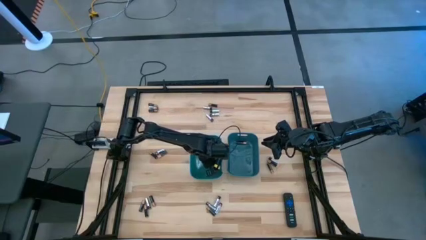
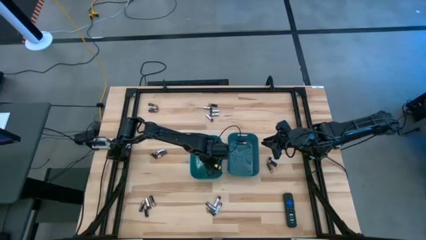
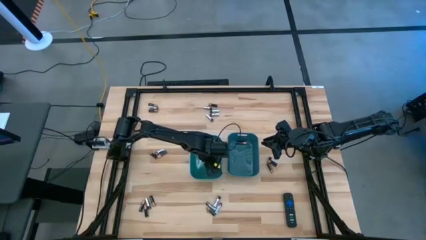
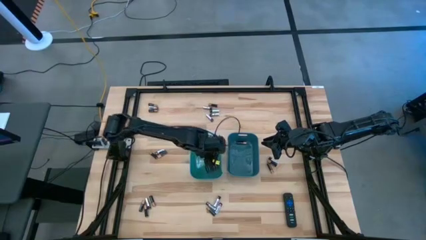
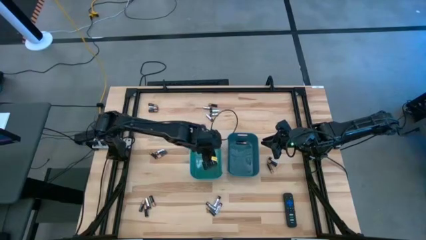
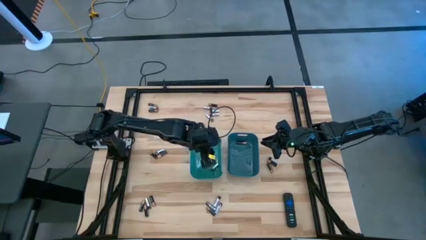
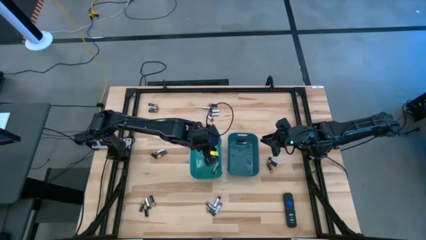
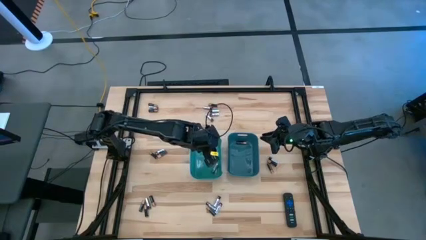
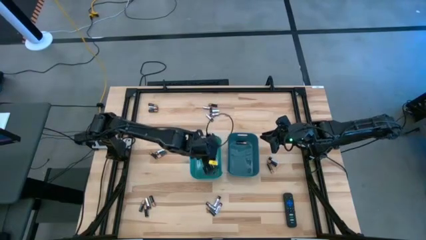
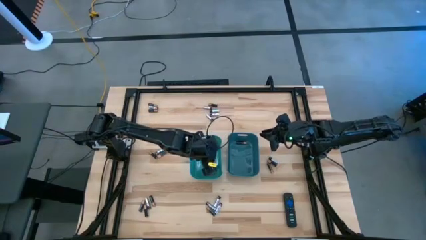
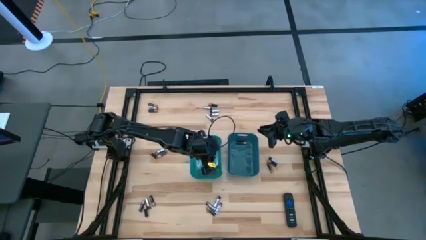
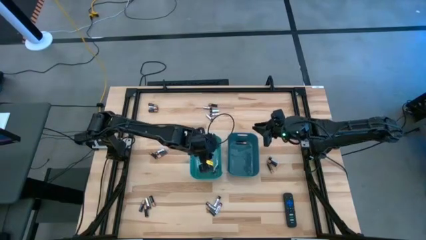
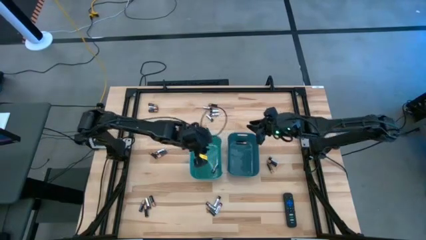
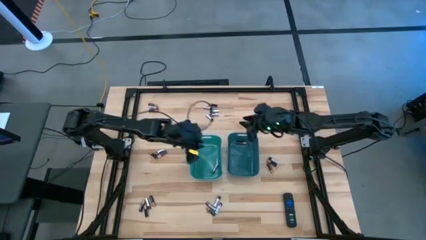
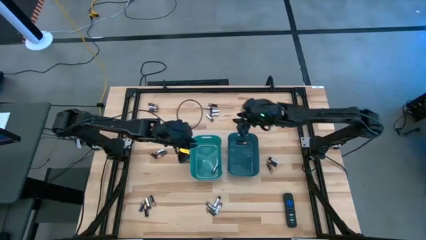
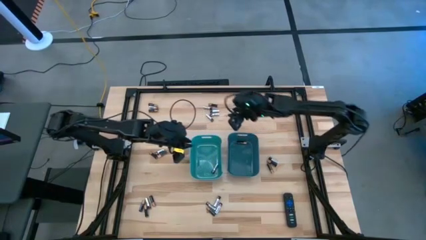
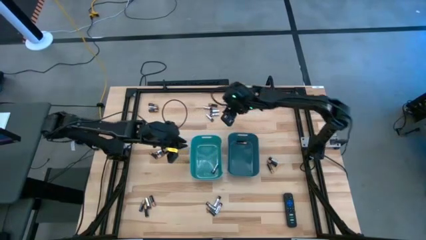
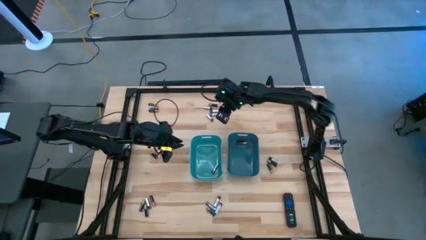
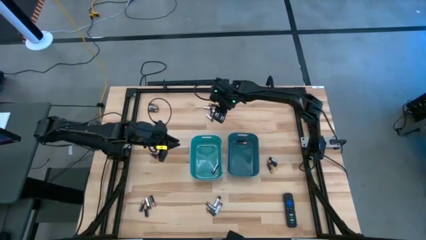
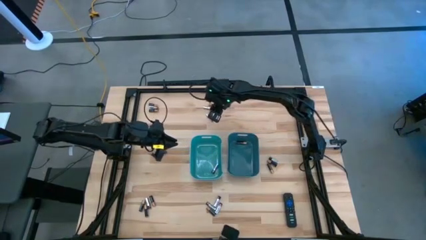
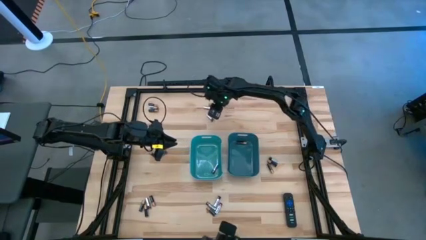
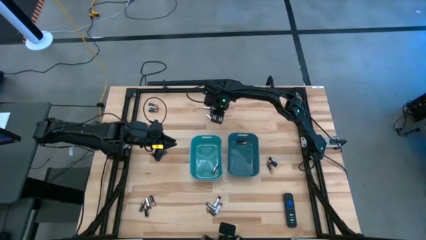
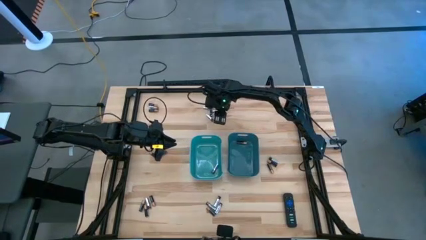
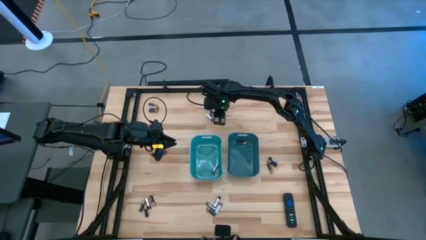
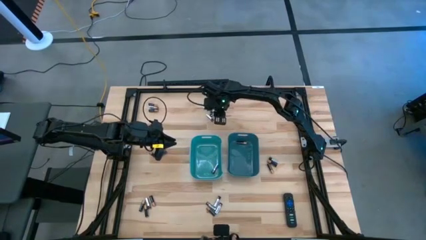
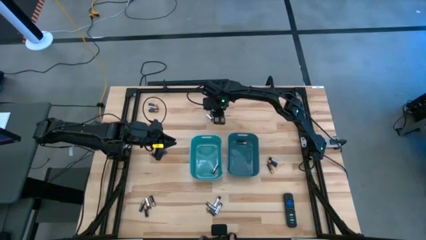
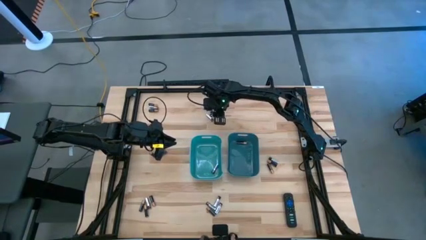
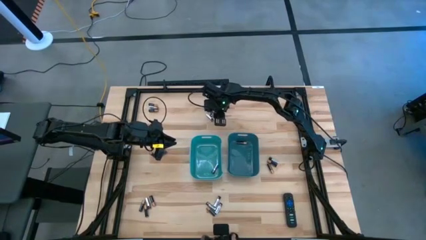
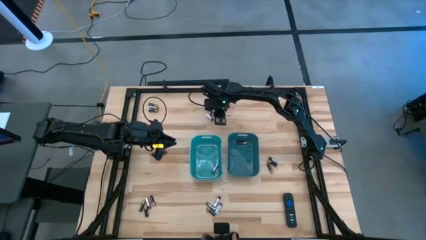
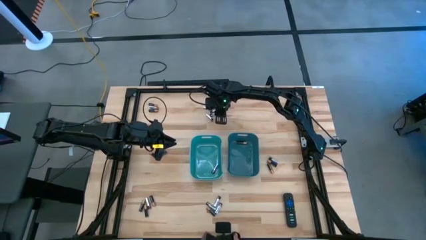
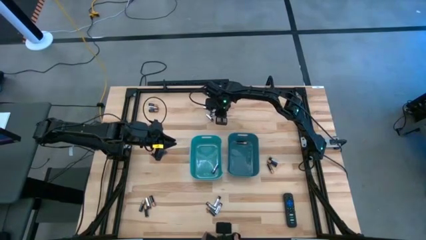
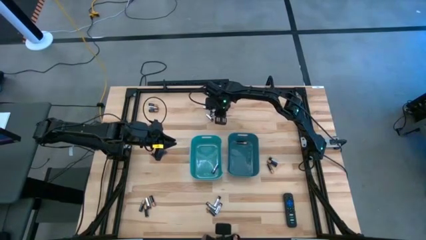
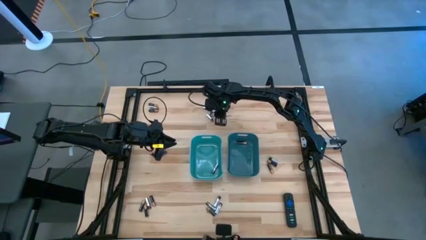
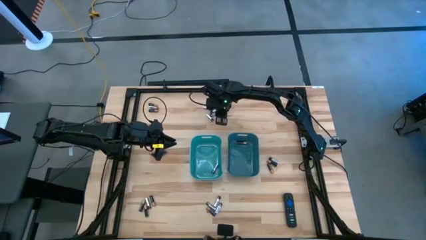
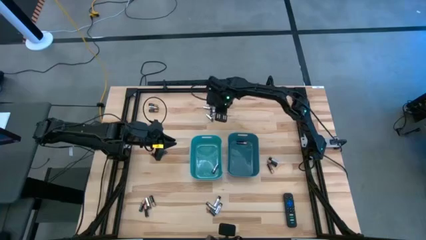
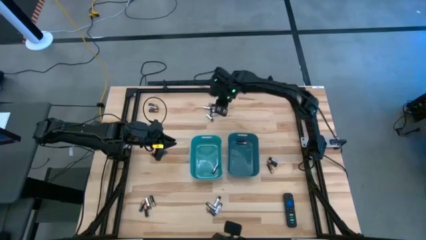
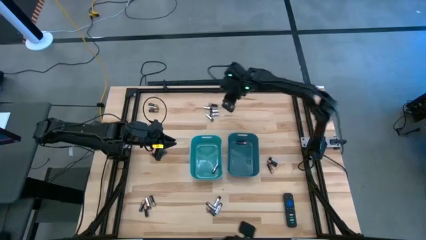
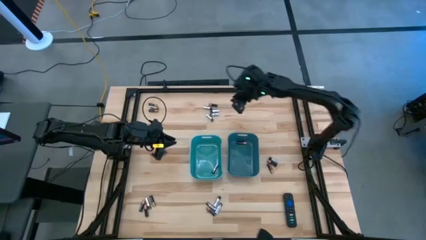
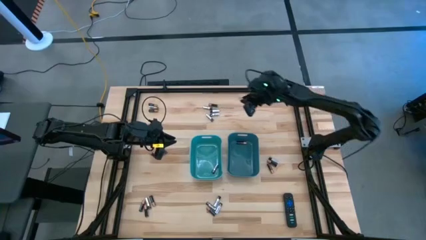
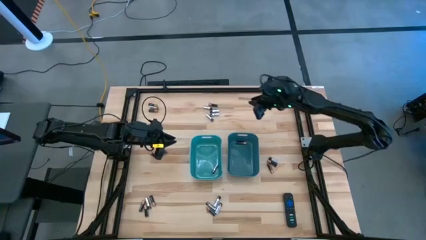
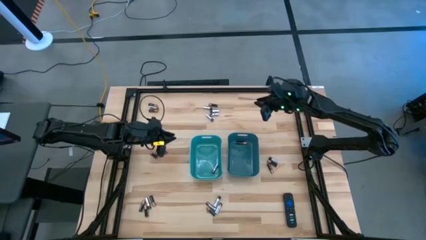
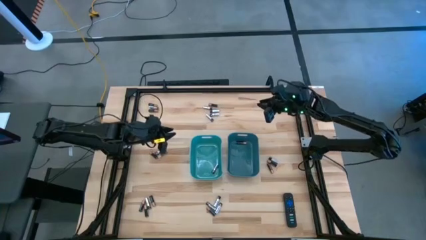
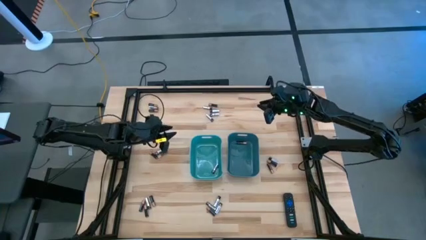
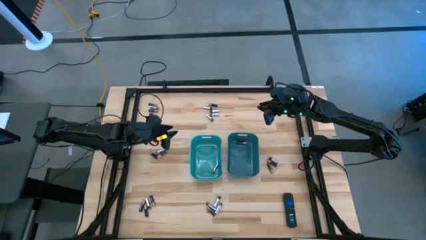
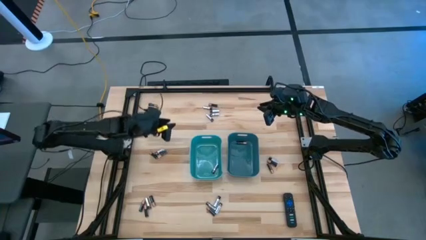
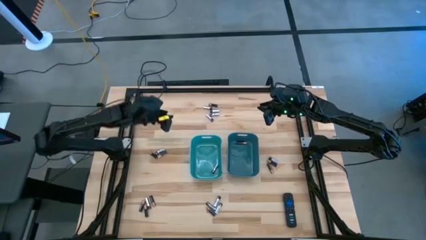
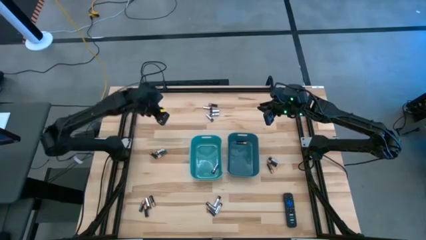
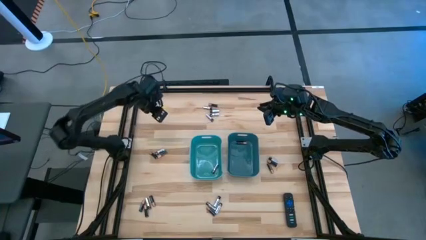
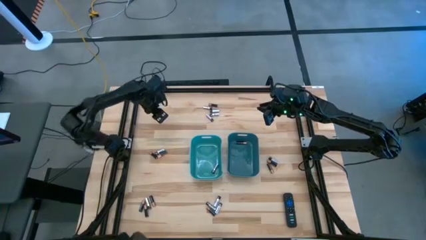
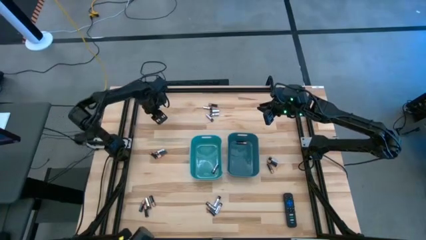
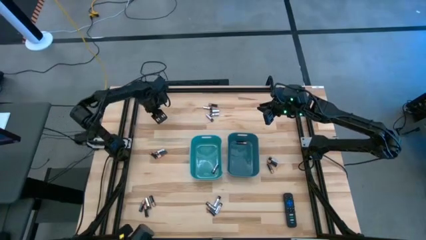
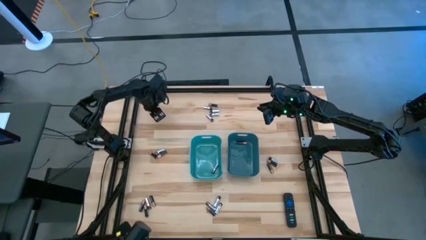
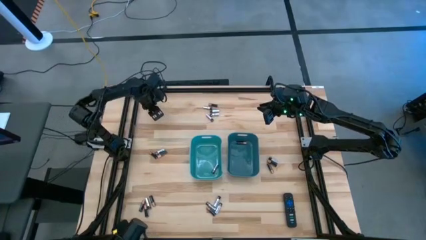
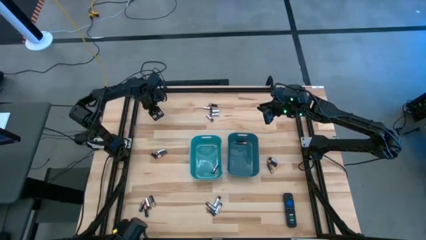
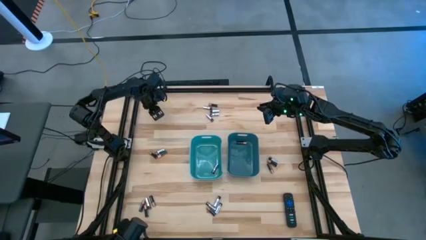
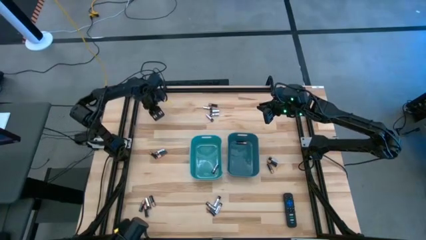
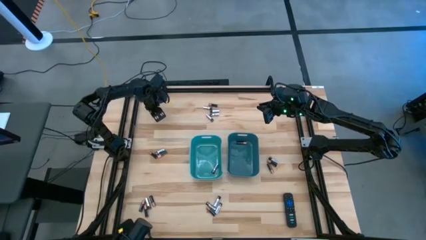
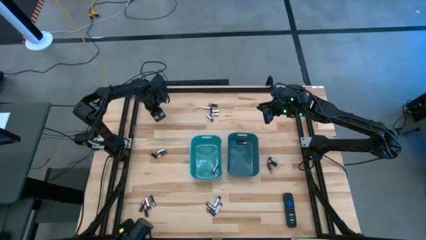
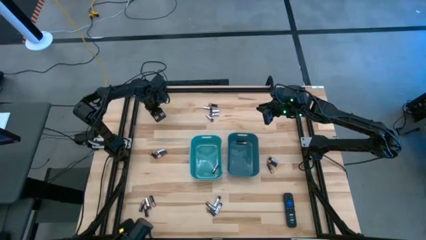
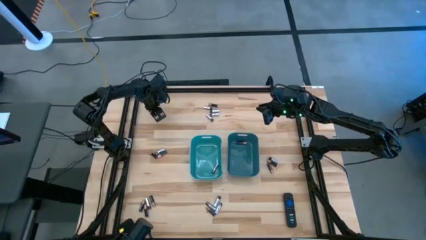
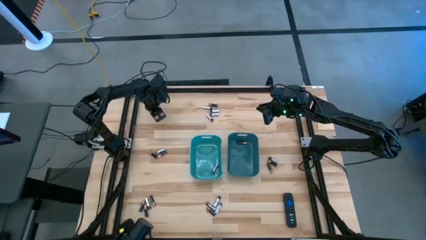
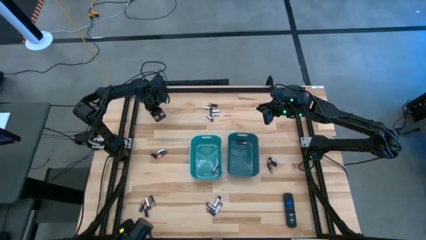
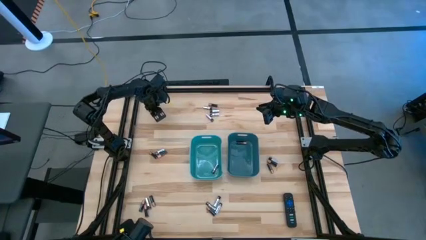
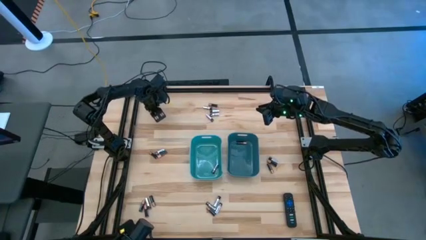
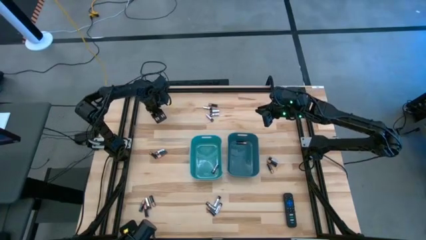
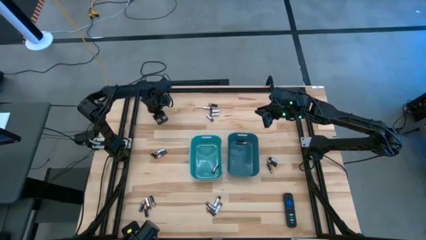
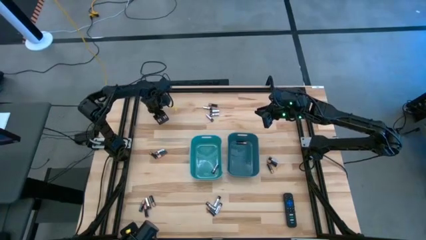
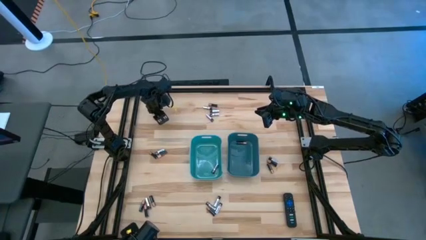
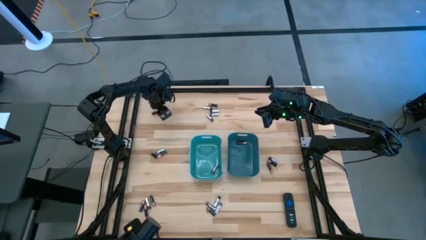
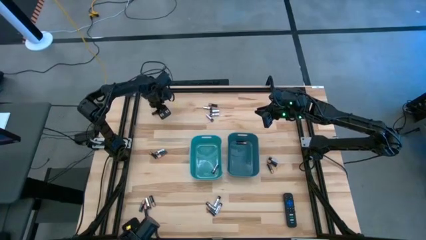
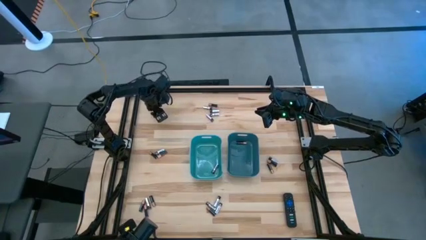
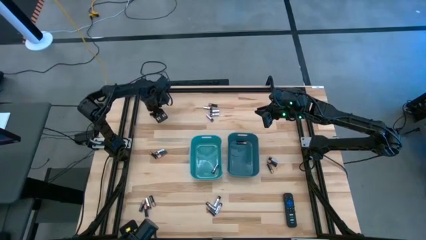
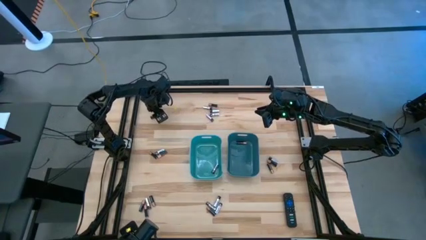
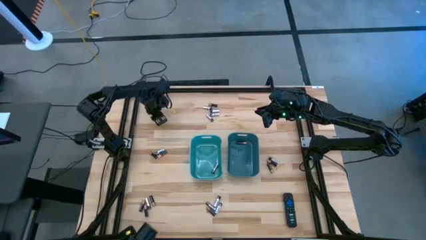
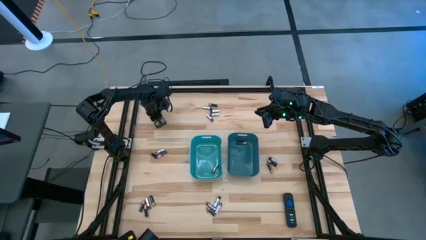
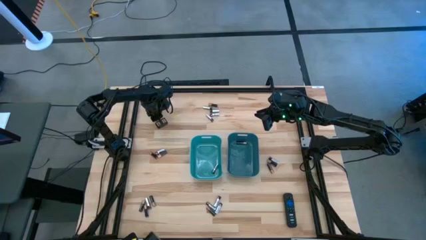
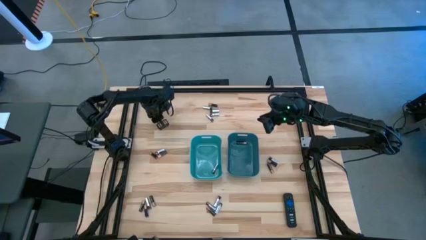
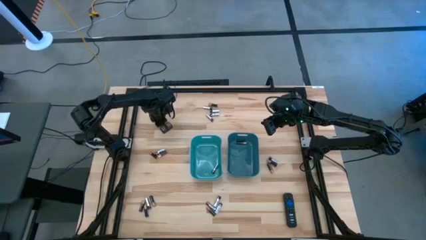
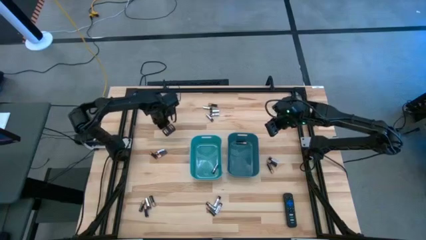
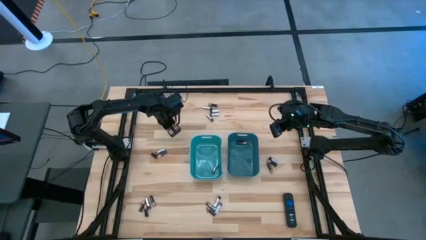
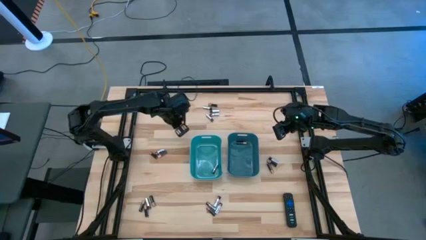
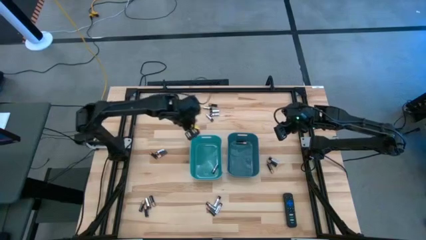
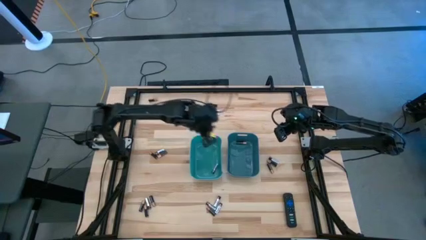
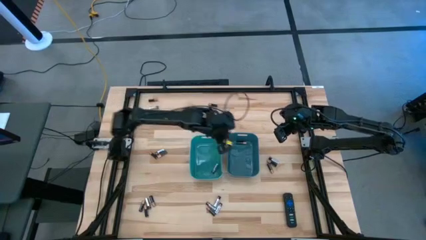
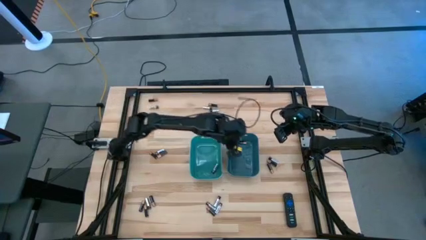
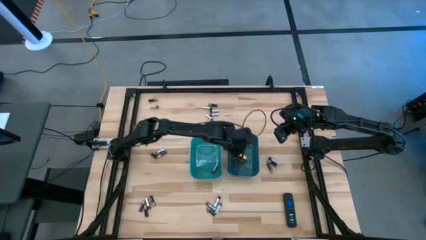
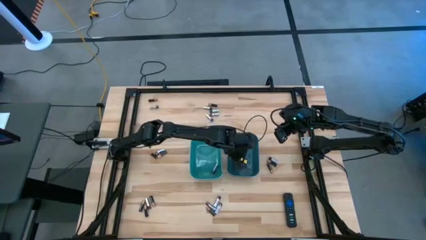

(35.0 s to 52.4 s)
Task: Sort batteries
Put the black battery into the blue bin
